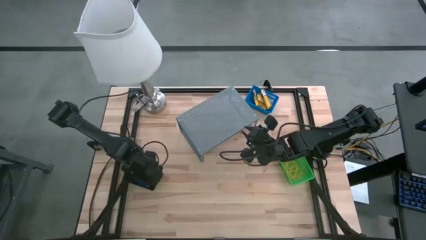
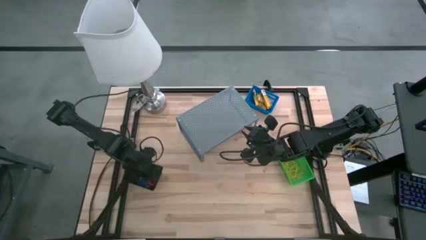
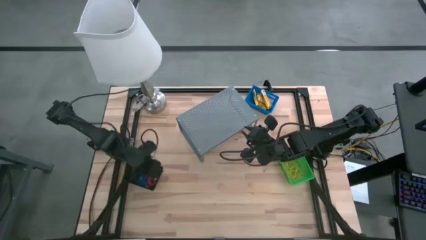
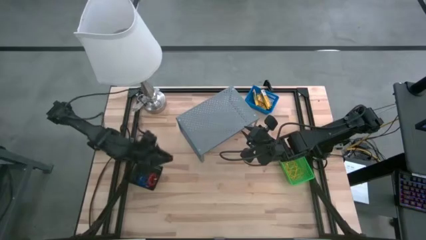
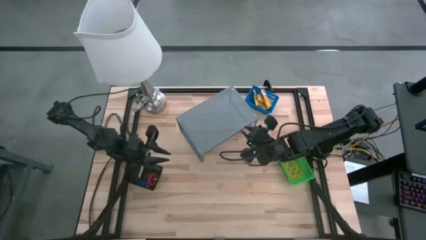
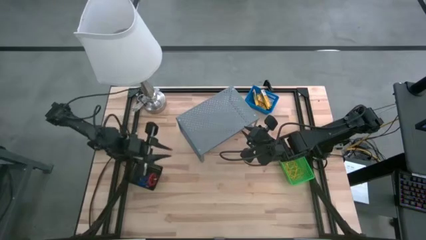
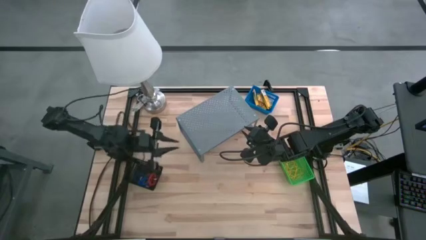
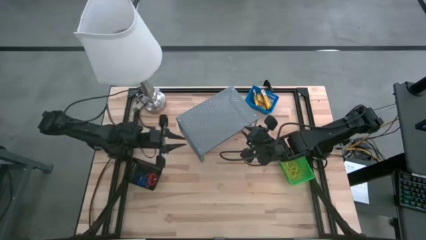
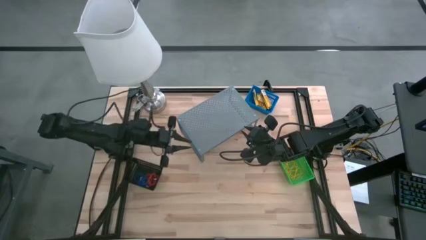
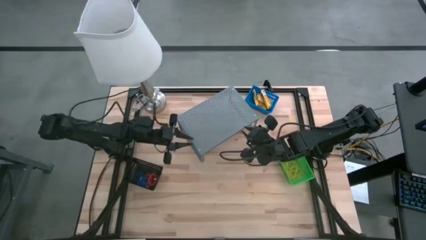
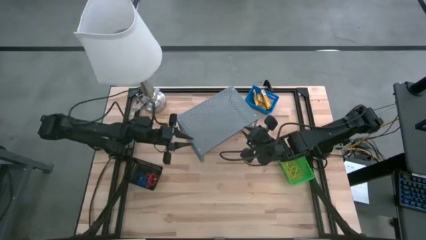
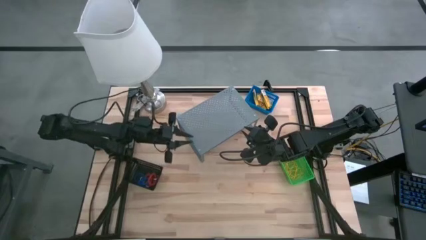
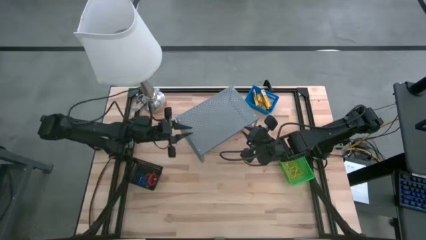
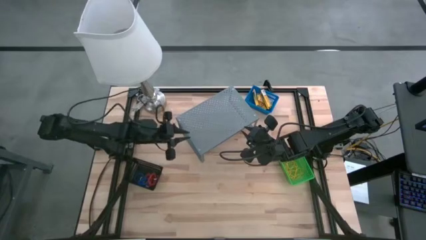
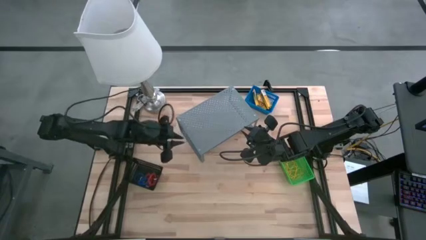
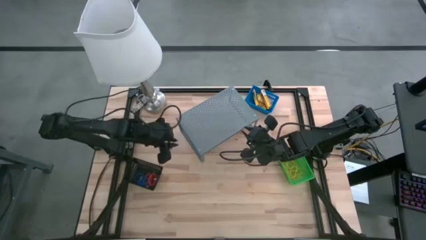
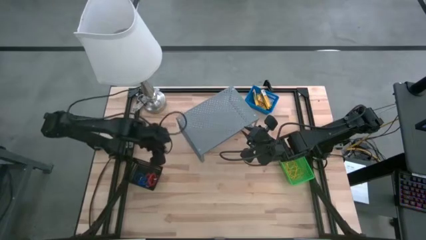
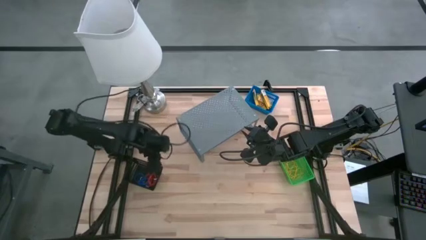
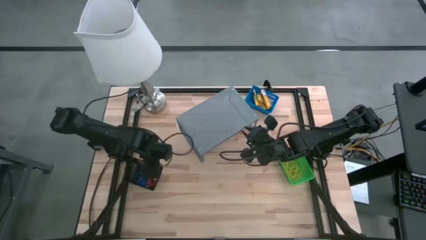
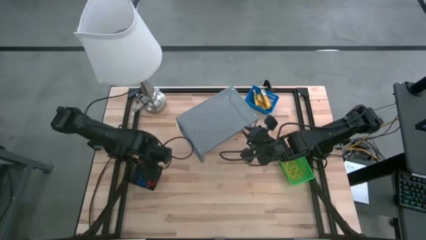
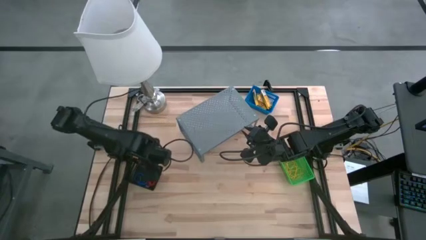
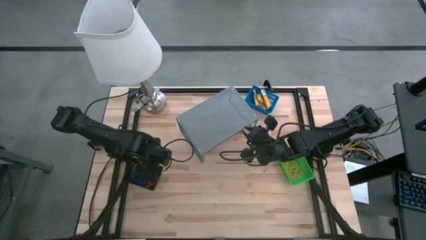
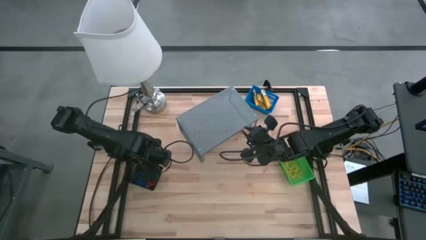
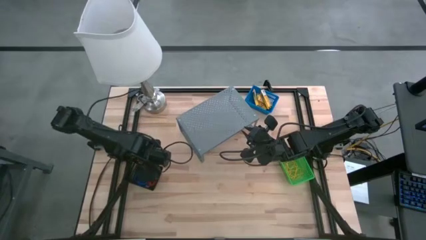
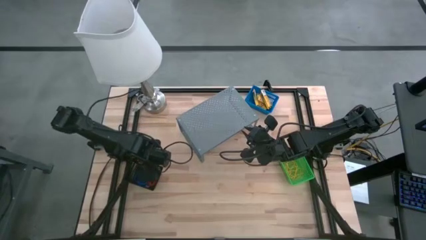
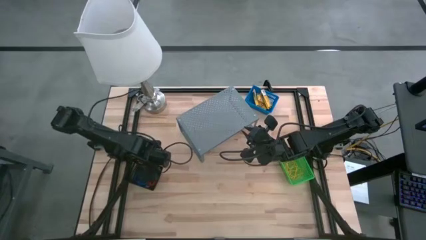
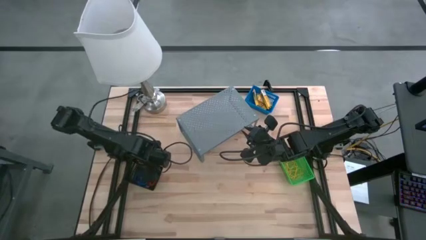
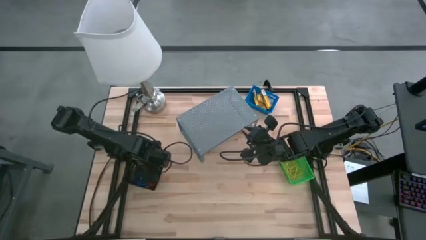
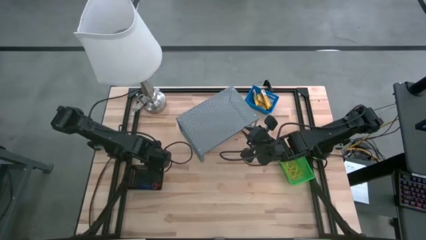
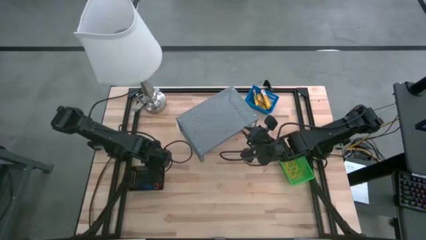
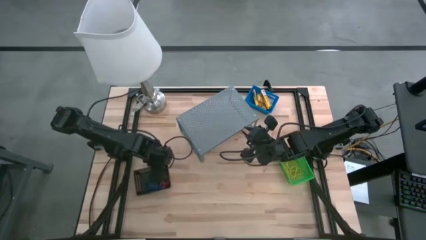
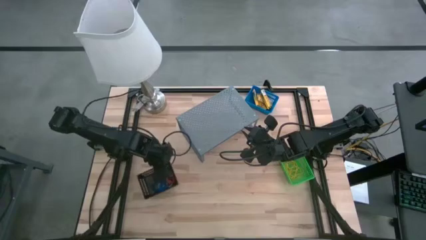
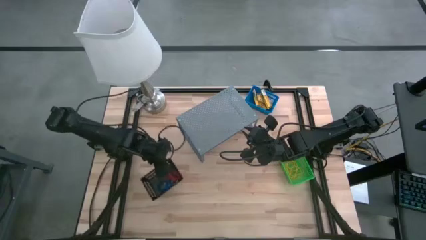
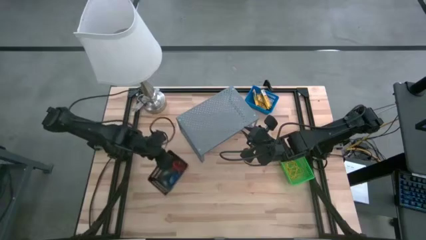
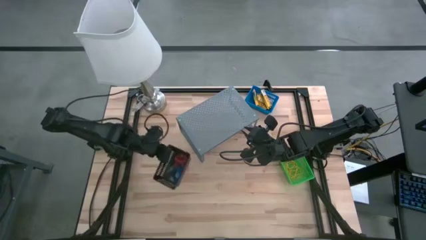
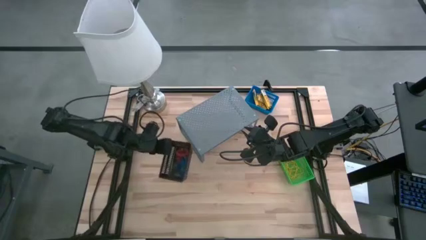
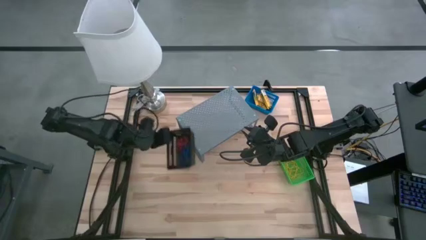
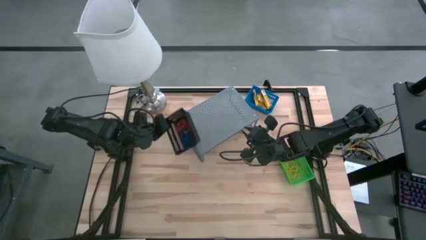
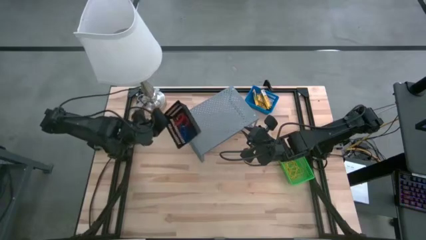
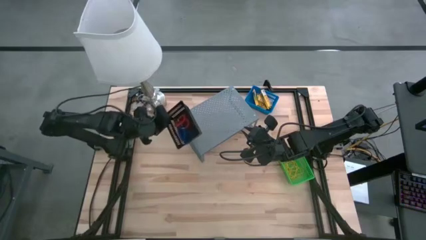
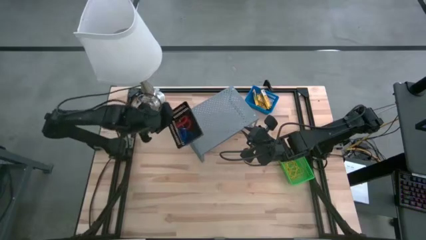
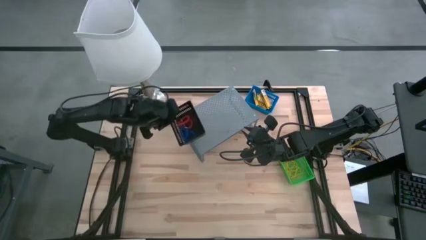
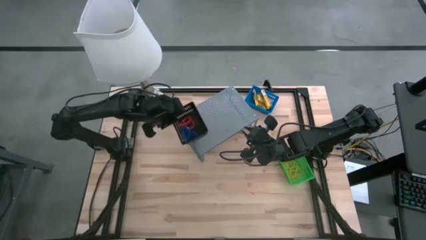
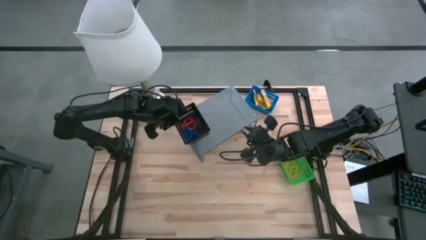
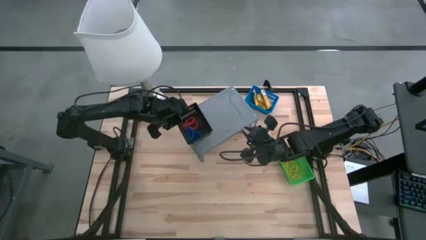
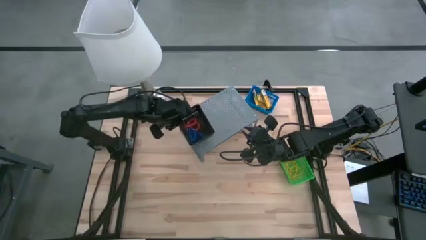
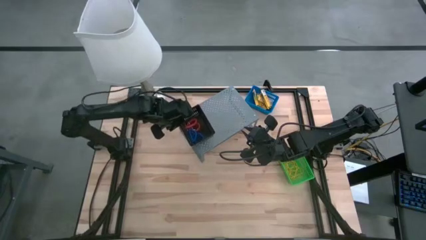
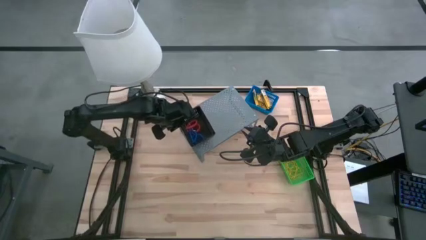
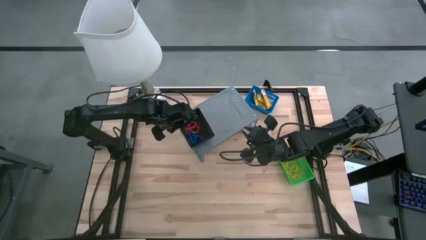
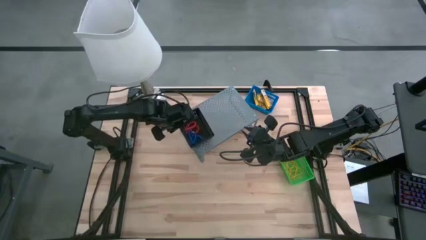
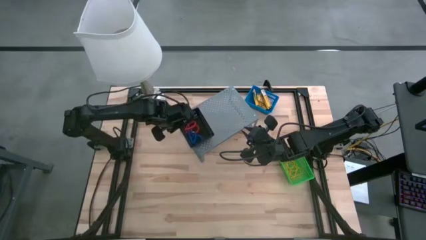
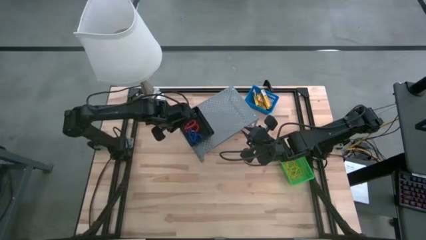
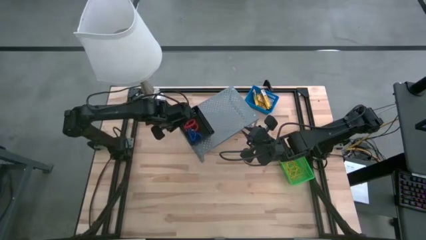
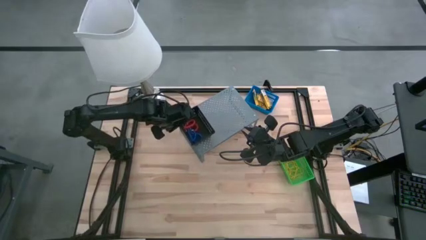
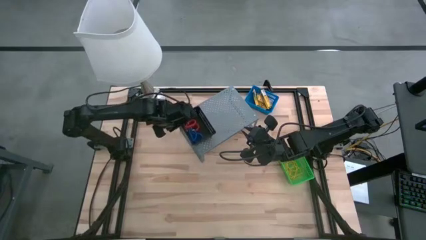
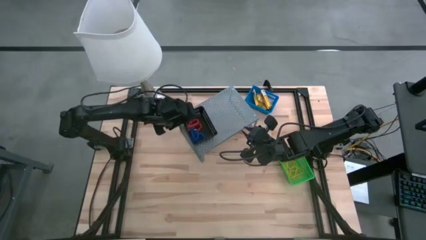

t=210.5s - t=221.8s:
Task: Pick & Place Office Desk Supplies
Put the black basket filled with spring keychains on the shelf
